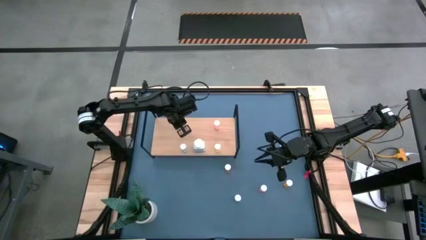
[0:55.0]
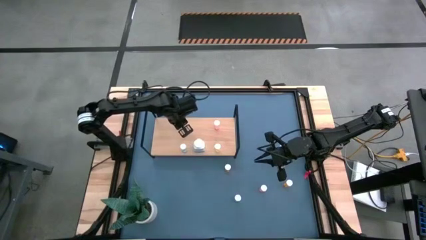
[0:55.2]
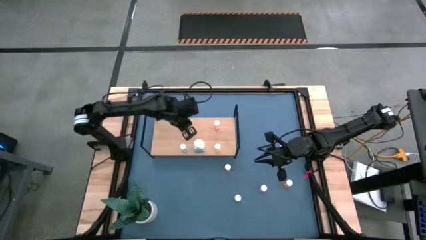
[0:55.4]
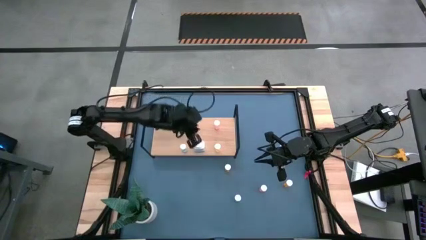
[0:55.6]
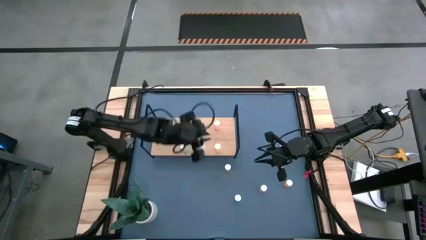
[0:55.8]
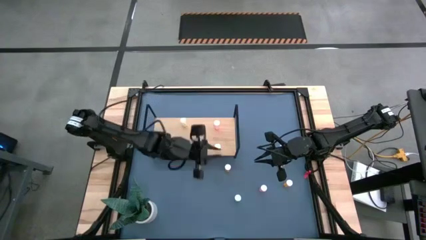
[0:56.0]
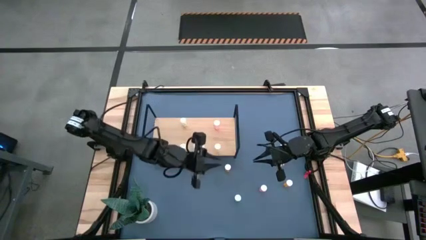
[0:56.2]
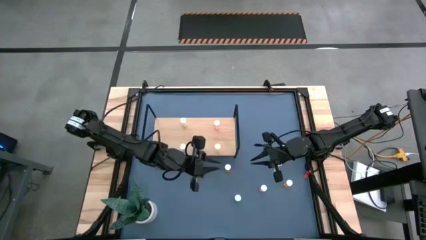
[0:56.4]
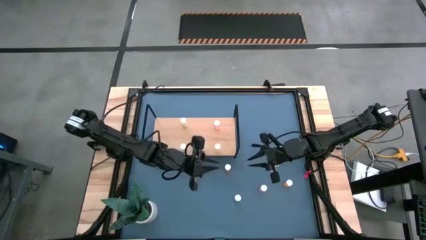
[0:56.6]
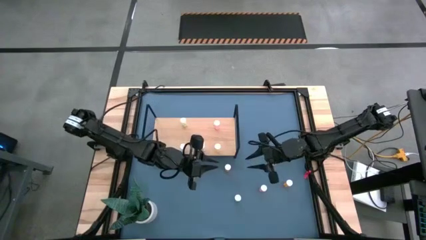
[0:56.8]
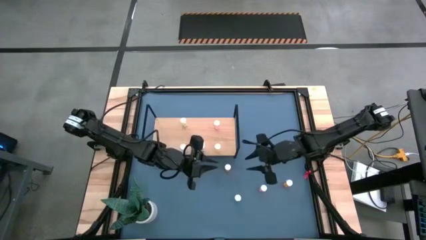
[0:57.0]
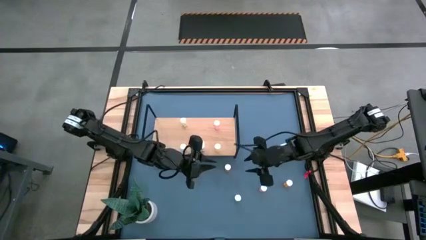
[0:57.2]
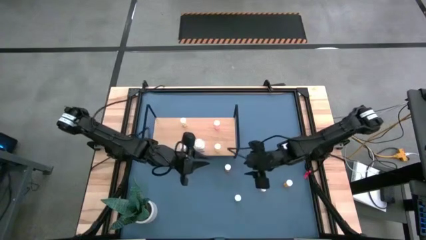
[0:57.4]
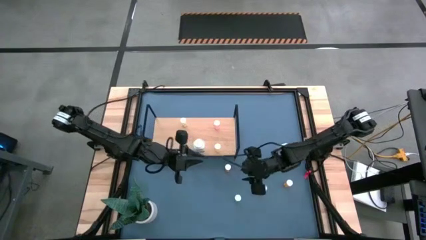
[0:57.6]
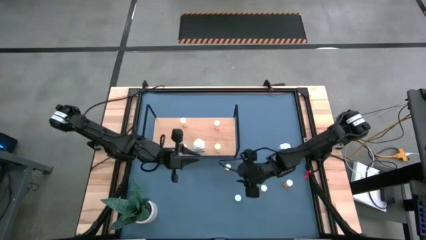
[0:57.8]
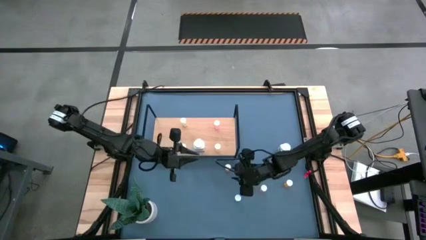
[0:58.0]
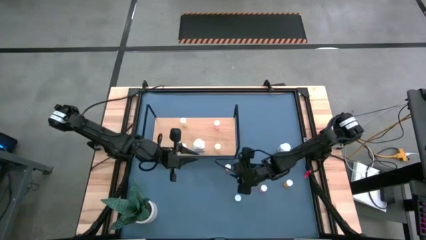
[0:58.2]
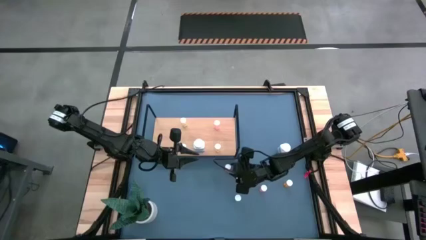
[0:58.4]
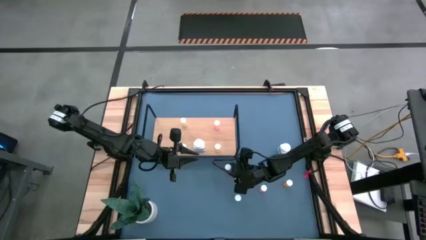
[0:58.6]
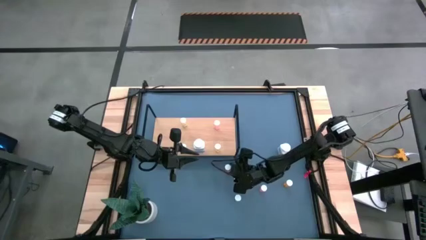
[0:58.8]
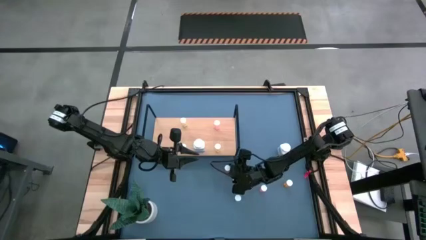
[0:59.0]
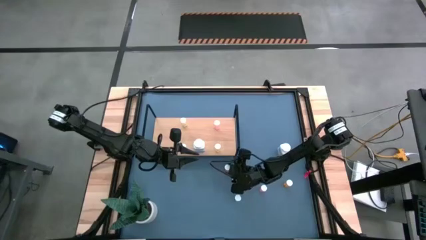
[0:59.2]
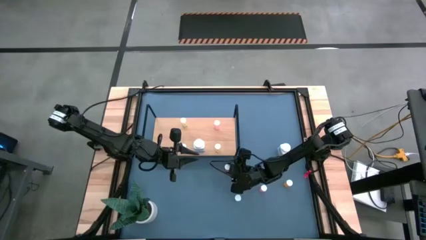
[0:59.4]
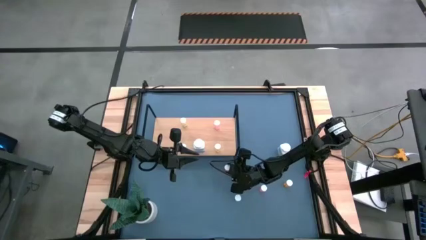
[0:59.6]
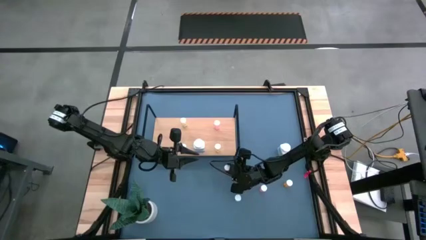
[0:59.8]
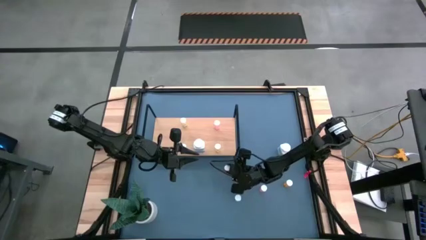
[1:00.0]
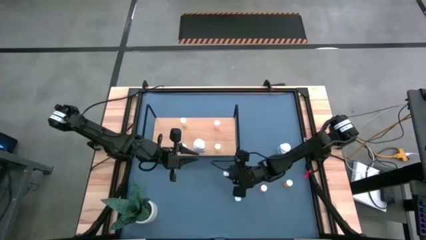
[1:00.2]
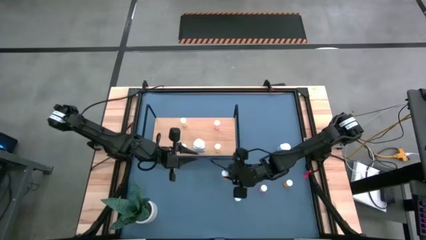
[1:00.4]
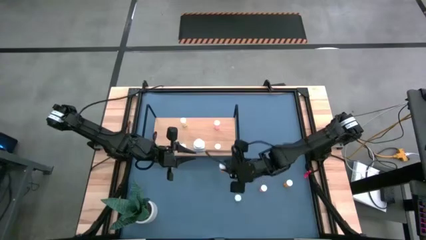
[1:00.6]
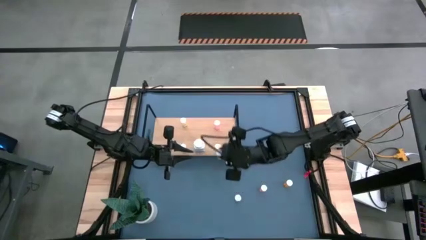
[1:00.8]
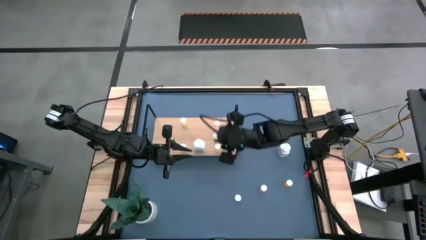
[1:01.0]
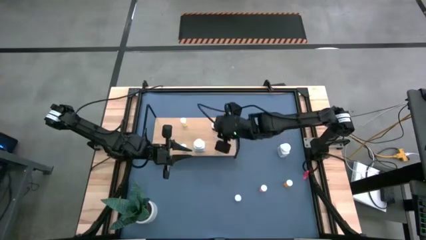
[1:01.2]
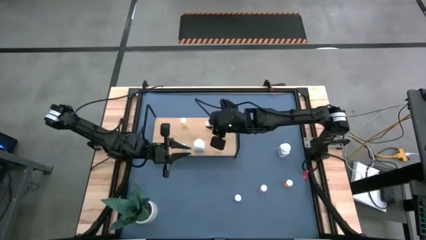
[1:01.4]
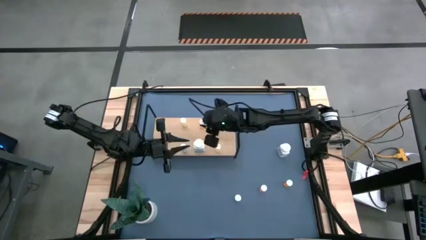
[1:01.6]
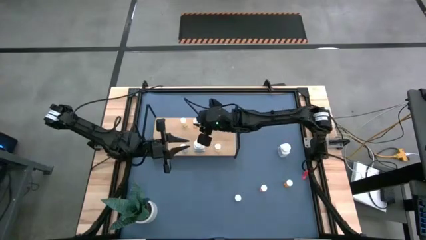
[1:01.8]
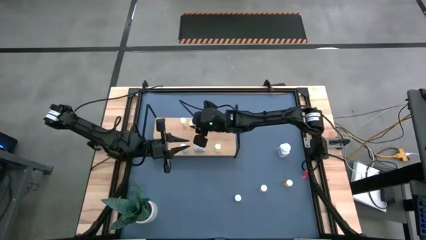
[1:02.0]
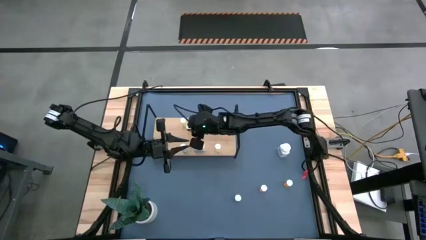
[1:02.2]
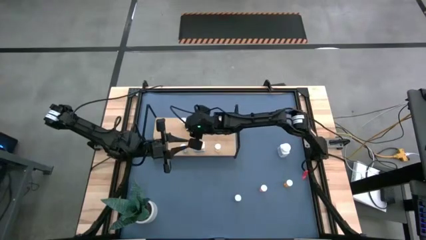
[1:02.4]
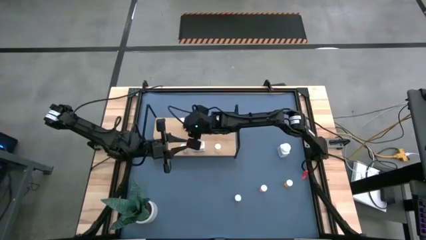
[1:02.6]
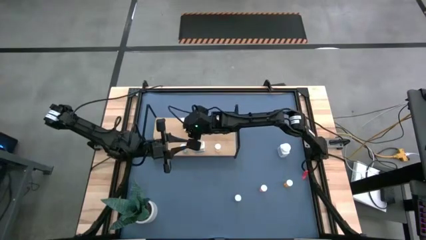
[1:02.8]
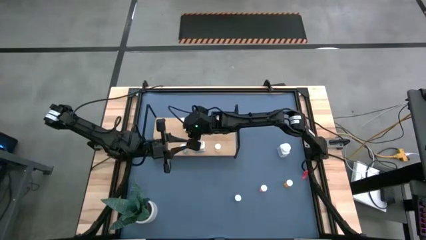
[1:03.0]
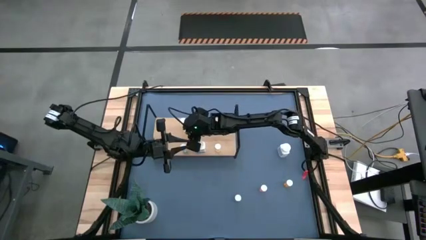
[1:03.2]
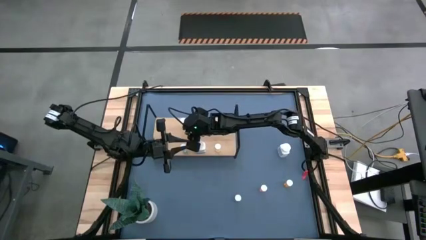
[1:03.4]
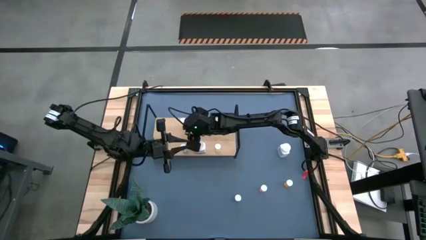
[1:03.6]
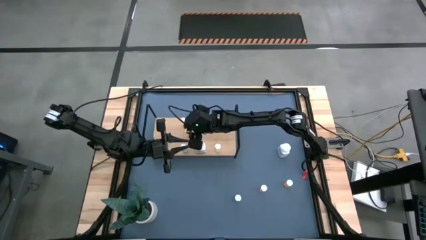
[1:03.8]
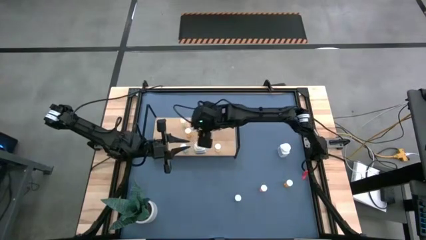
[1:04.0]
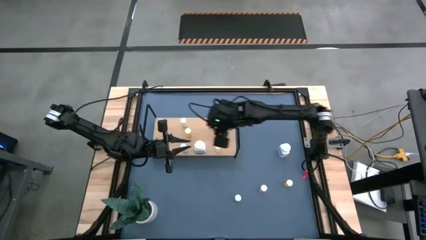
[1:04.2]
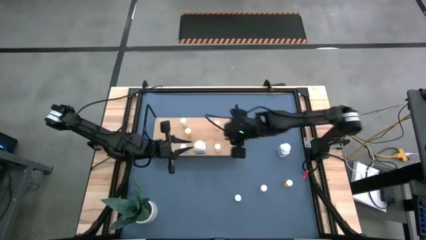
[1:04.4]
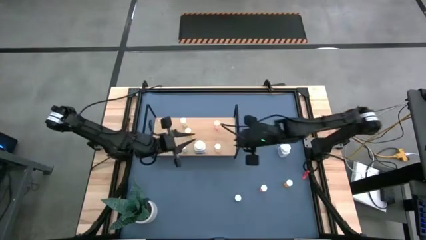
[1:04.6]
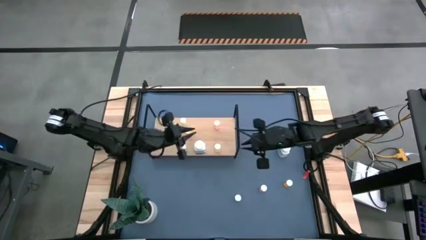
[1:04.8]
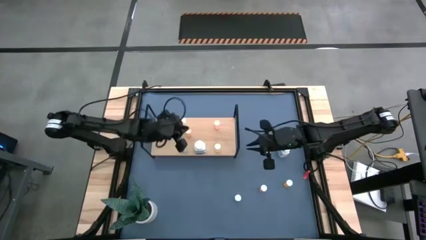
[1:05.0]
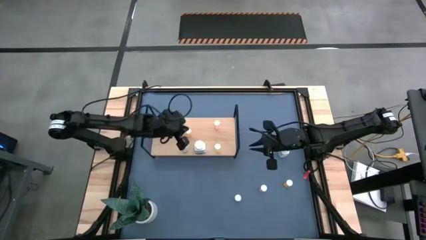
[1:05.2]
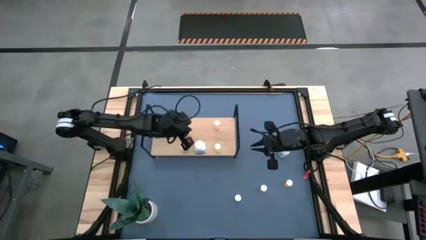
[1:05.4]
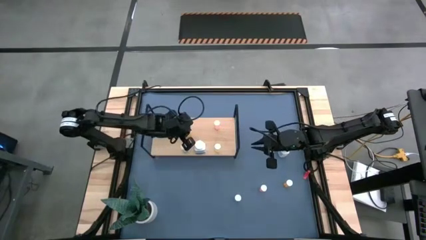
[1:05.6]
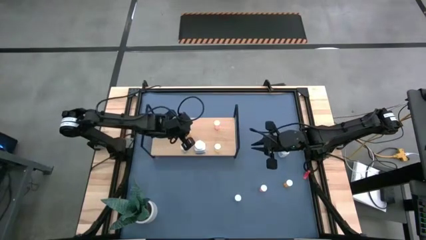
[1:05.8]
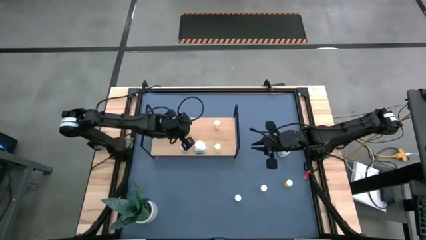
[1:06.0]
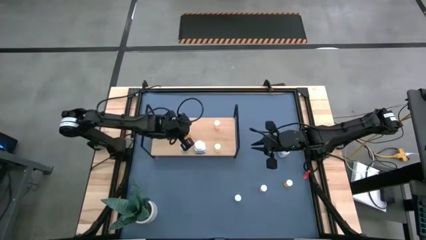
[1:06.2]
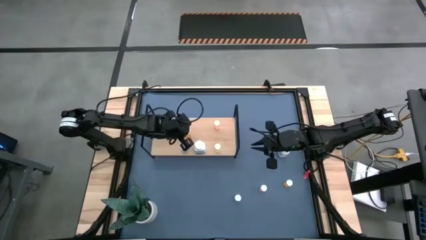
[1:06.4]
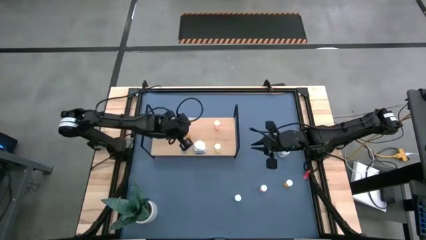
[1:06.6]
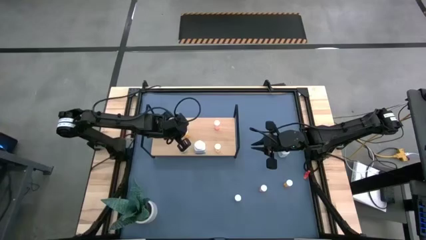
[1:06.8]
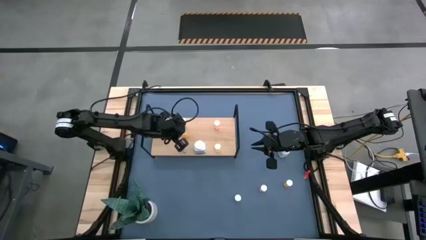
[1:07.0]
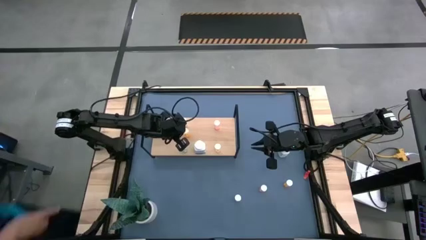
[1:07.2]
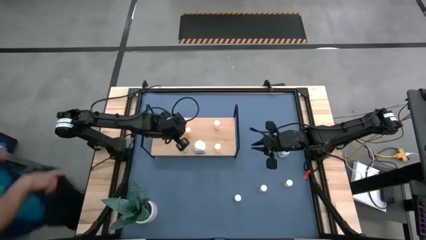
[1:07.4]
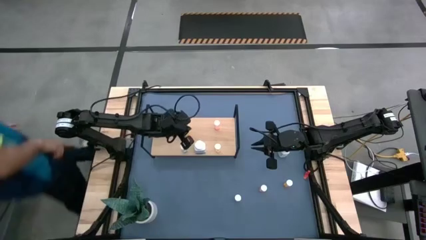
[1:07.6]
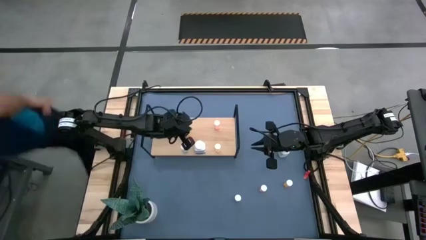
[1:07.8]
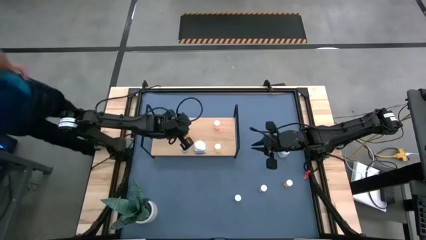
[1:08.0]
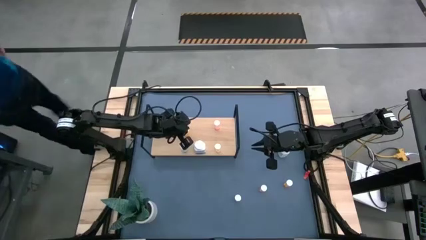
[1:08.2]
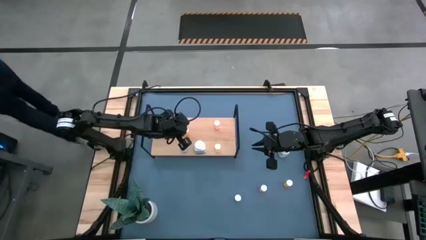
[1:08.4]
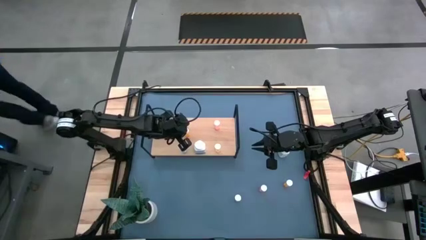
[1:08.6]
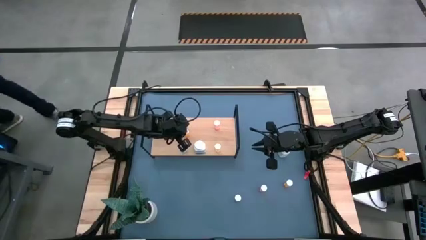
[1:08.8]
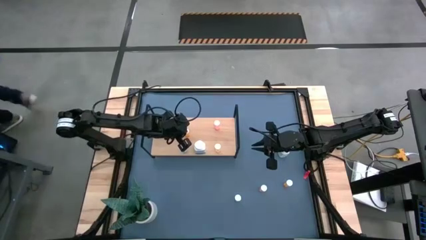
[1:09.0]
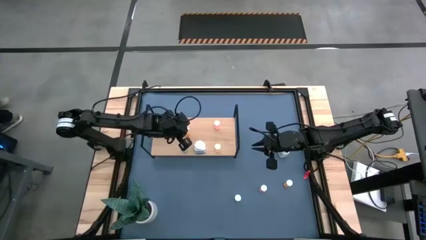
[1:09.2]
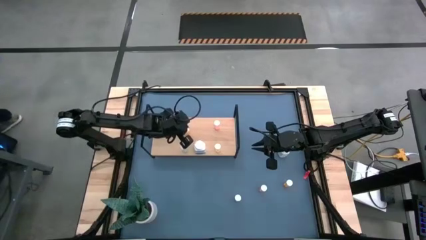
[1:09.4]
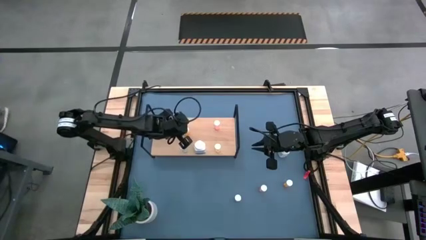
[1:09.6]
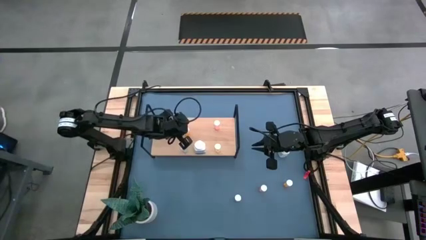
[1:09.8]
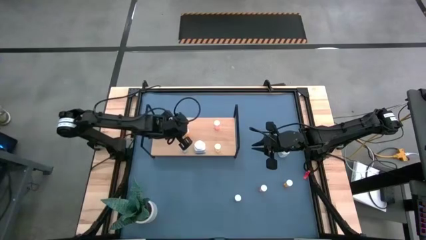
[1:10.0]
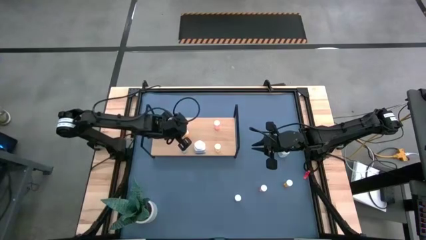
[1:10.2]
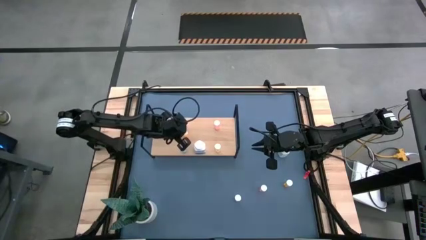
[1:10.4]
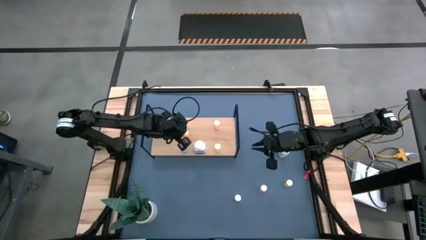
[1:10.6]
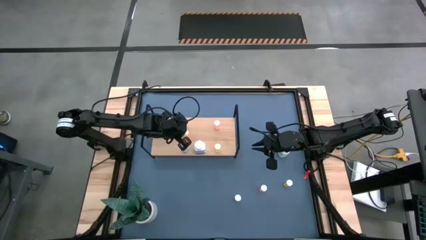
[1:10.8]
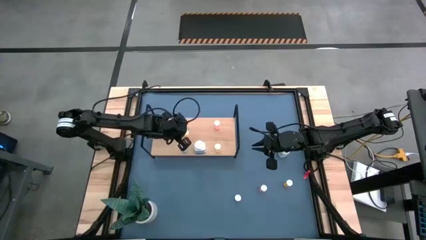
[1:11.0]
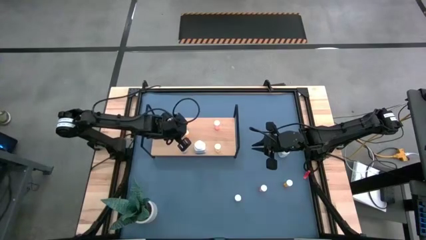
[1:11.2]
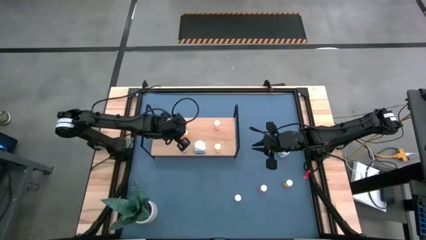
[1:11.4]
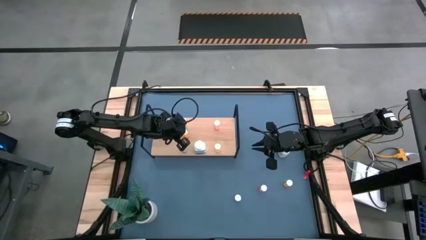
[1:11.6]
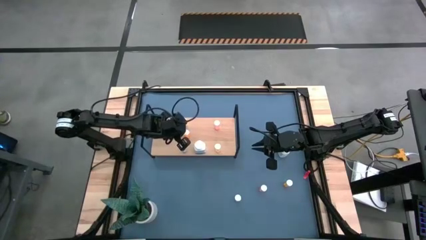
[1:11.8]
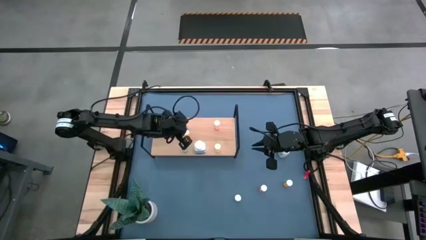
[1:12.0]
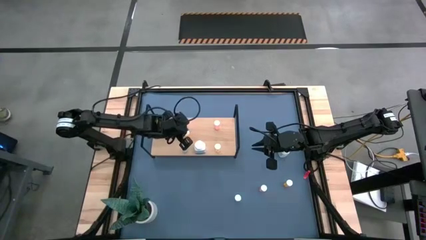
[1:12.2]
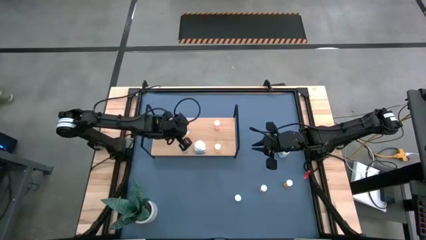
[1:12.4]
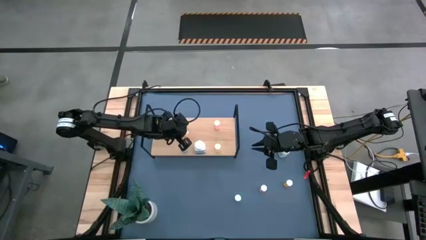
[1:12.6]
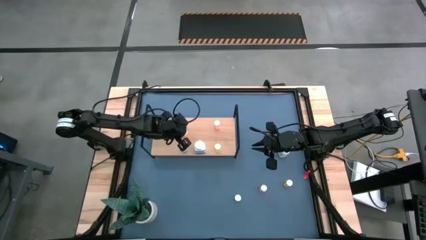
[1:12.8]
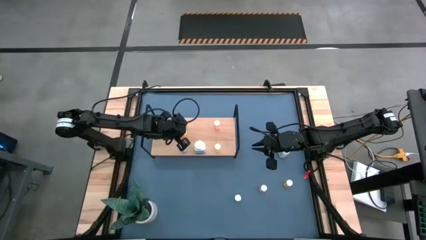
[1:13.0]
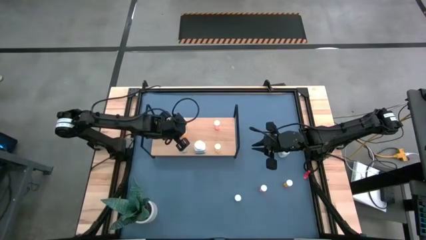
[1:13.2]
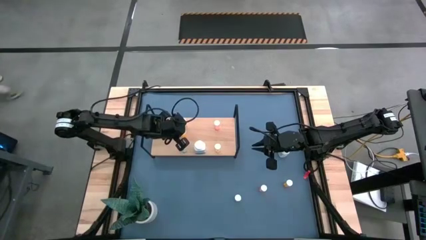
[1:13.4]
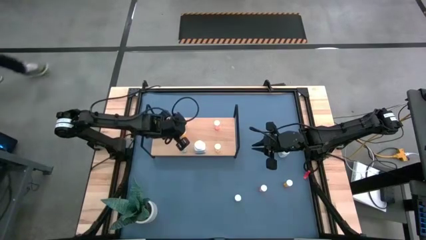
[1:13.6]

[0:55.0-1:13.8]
Task: Pick and place medicine bottles onto shelf by color
Put the top orange pill bottle on the shelf
